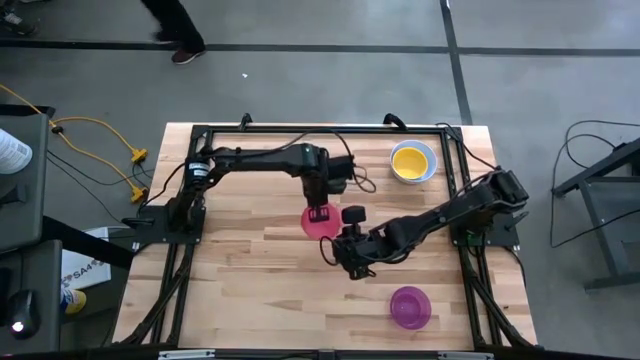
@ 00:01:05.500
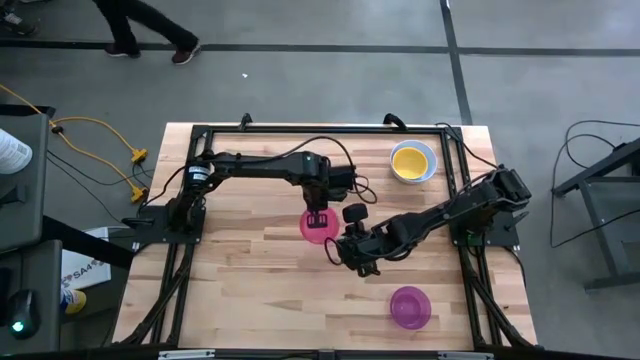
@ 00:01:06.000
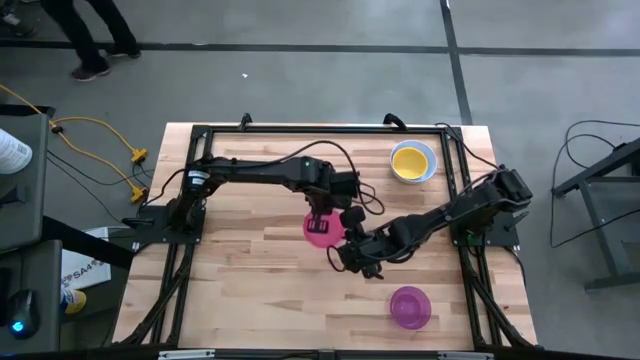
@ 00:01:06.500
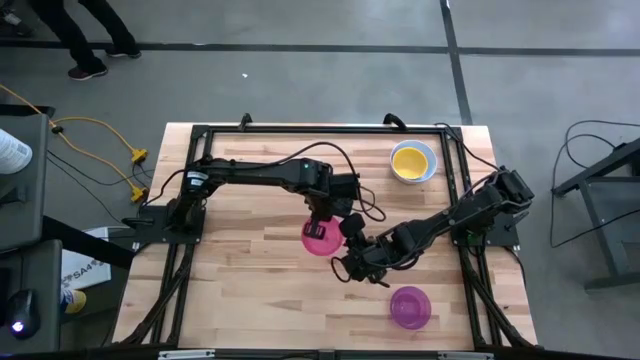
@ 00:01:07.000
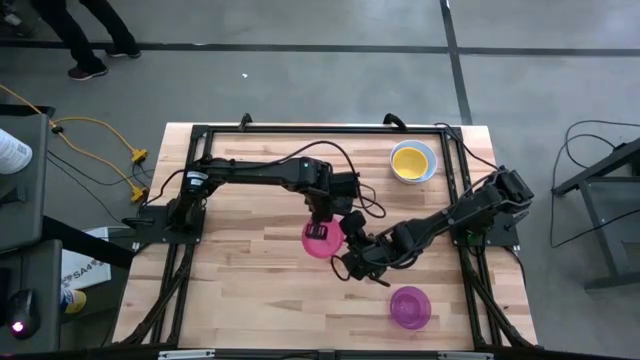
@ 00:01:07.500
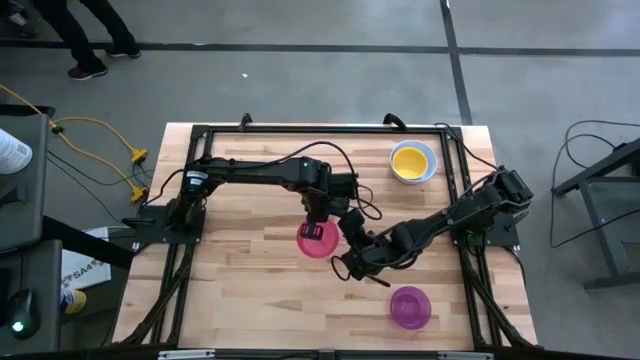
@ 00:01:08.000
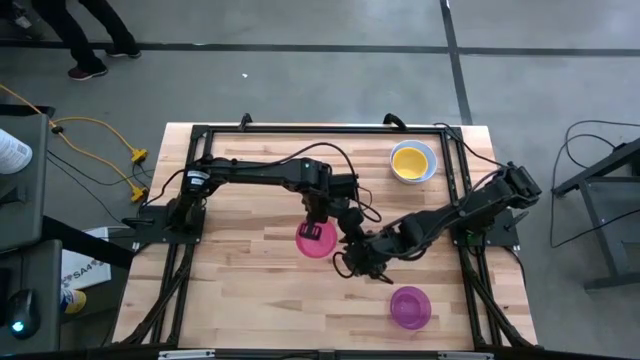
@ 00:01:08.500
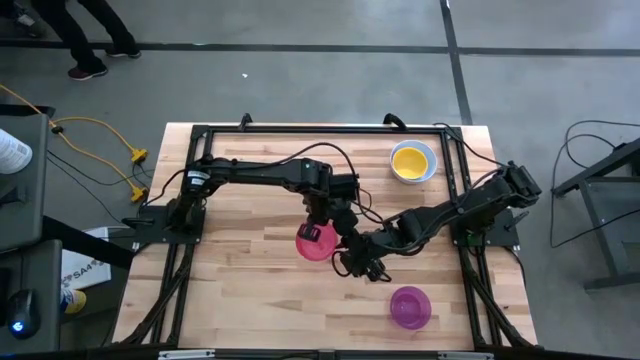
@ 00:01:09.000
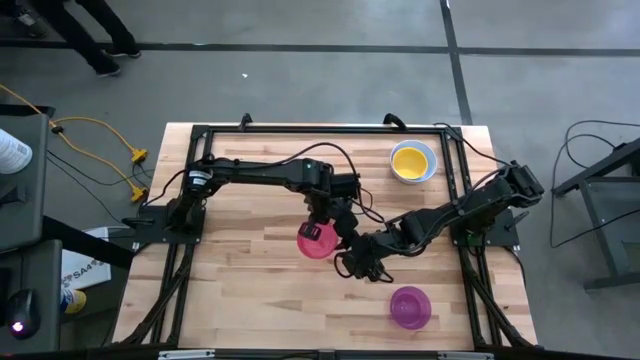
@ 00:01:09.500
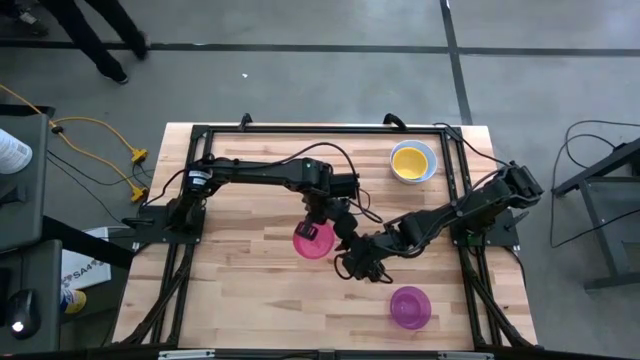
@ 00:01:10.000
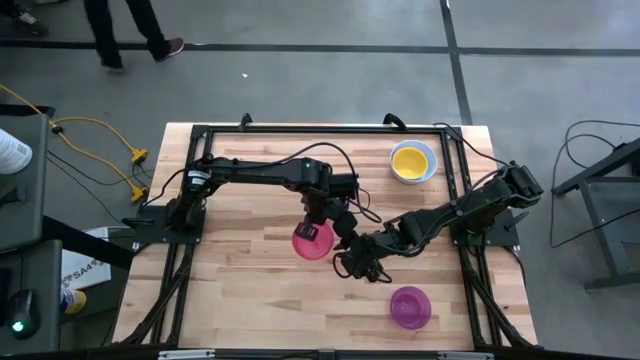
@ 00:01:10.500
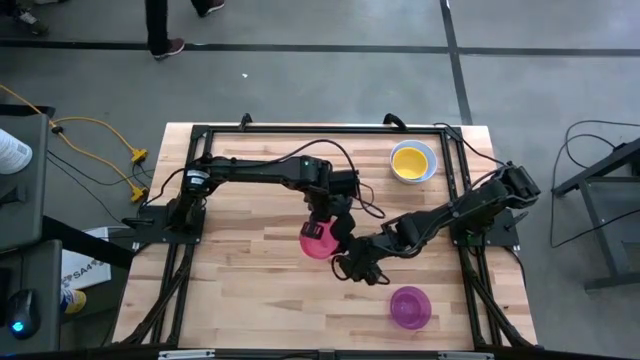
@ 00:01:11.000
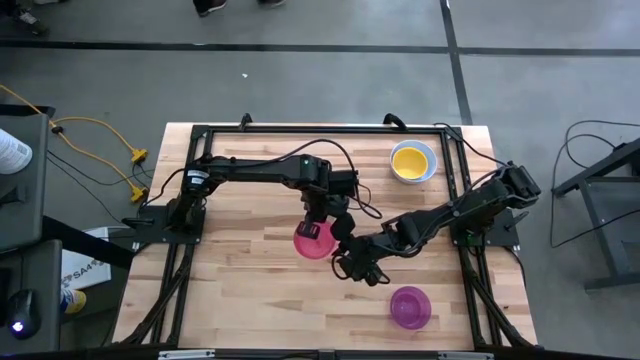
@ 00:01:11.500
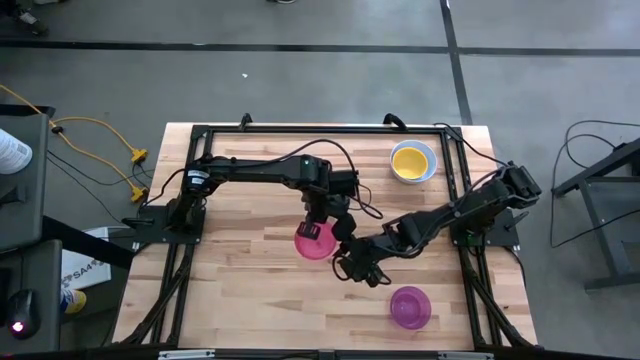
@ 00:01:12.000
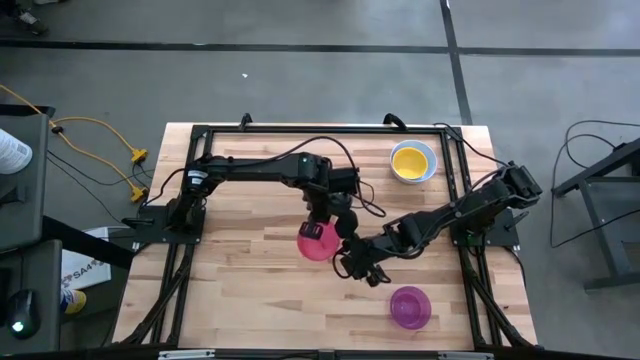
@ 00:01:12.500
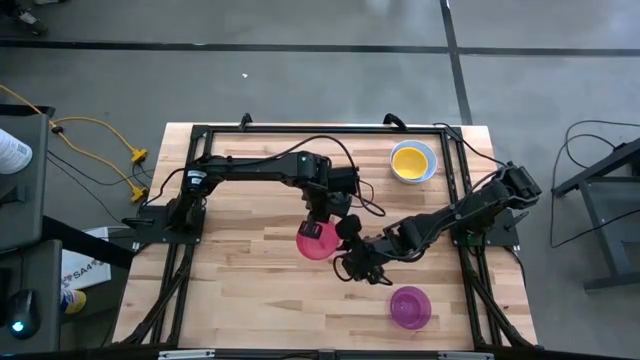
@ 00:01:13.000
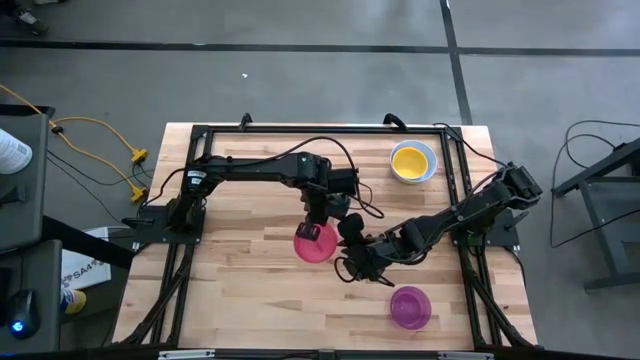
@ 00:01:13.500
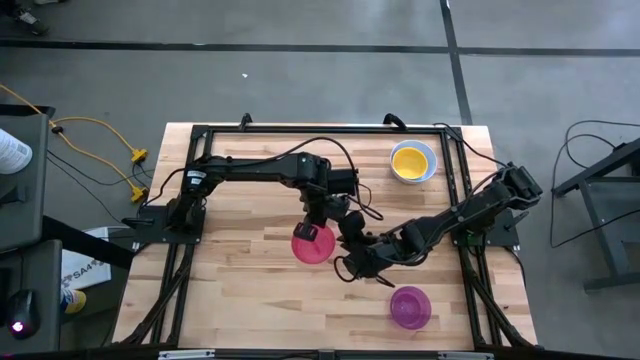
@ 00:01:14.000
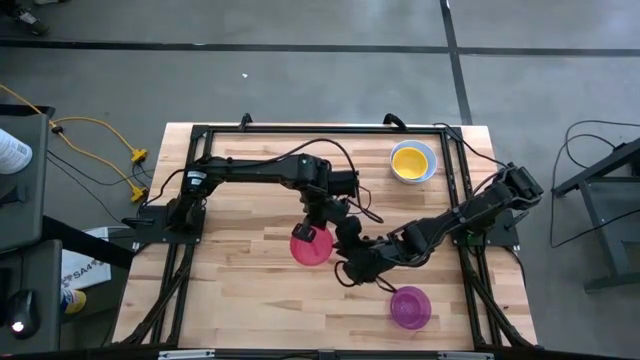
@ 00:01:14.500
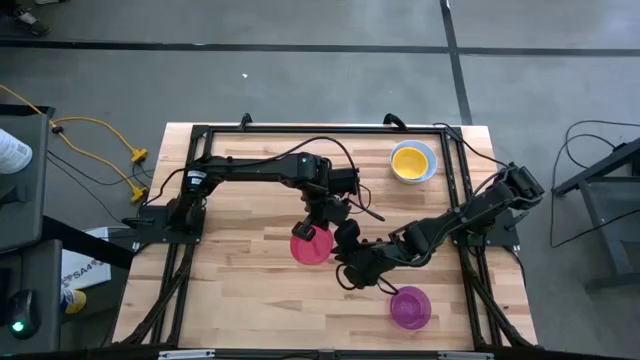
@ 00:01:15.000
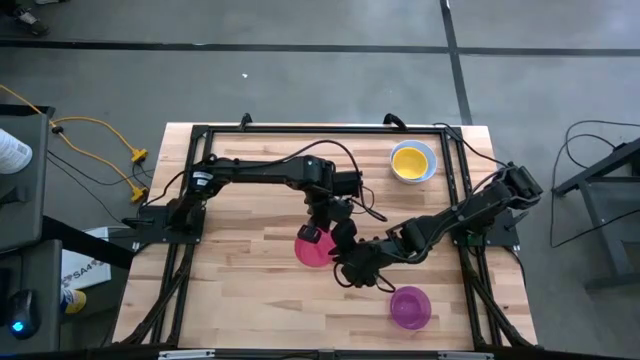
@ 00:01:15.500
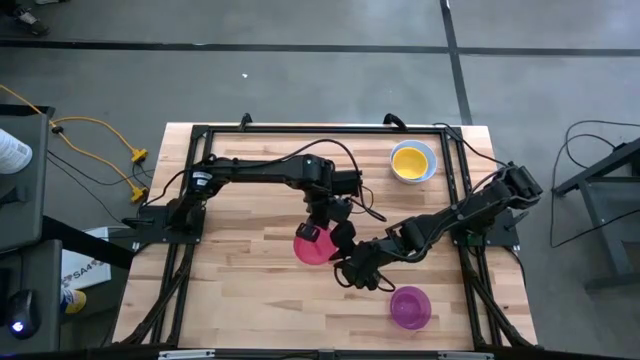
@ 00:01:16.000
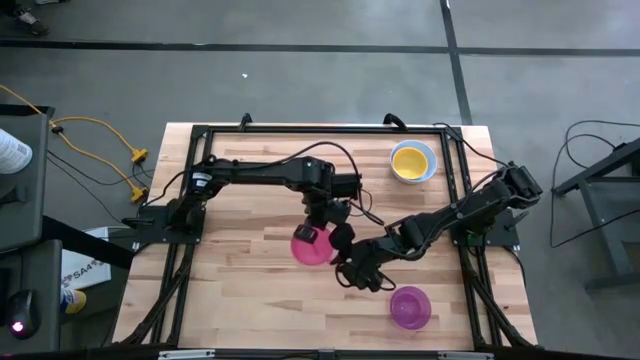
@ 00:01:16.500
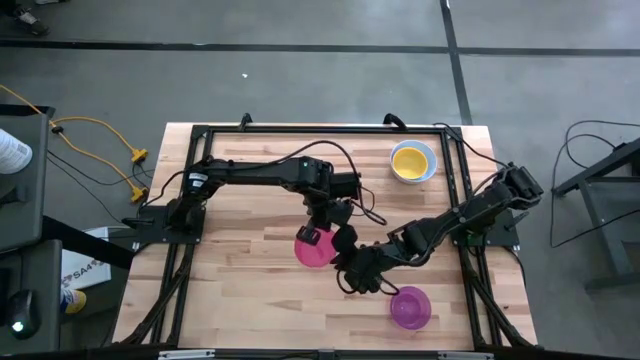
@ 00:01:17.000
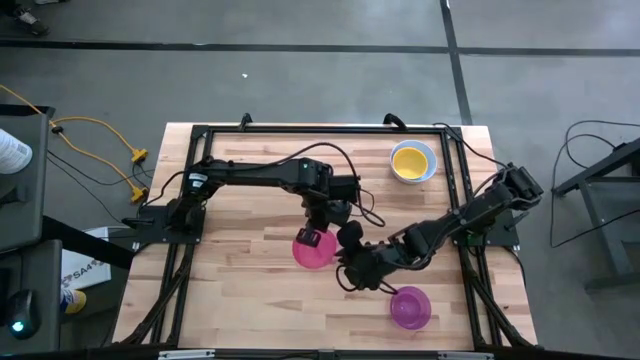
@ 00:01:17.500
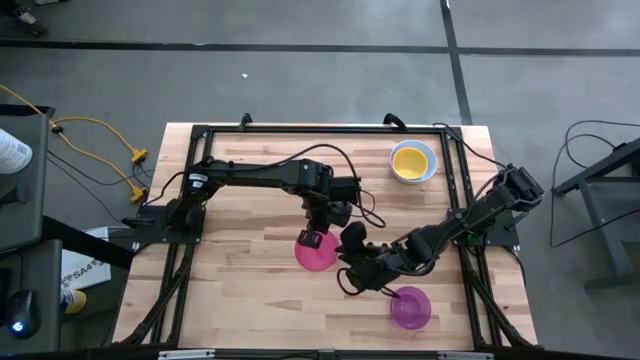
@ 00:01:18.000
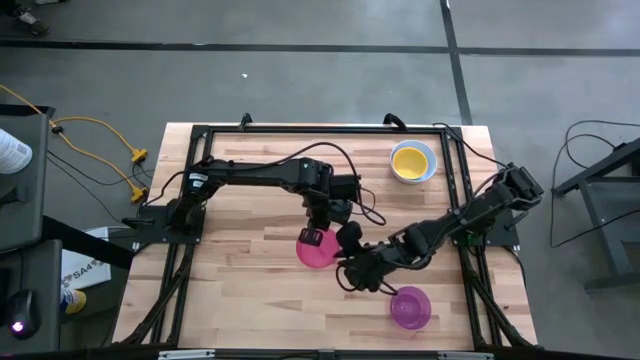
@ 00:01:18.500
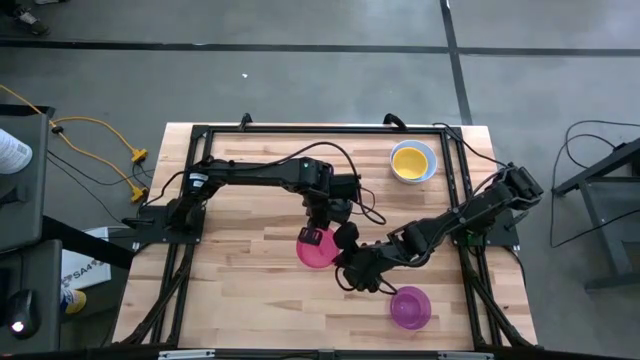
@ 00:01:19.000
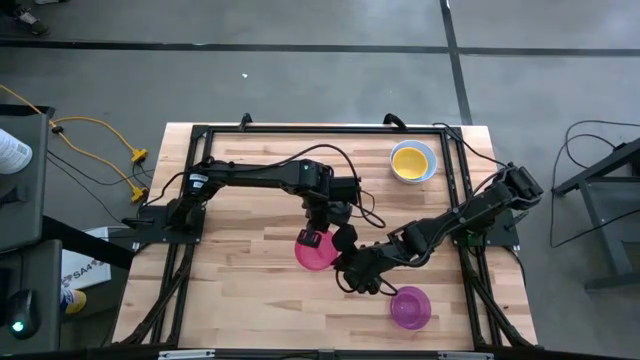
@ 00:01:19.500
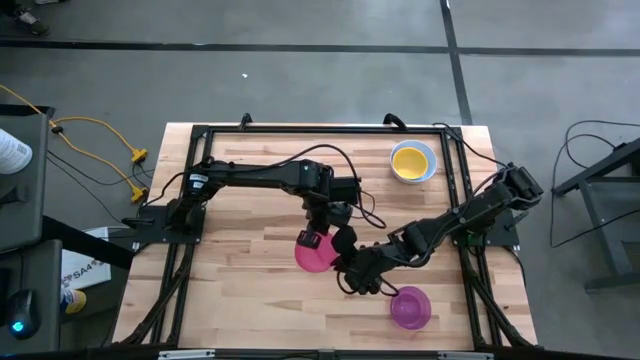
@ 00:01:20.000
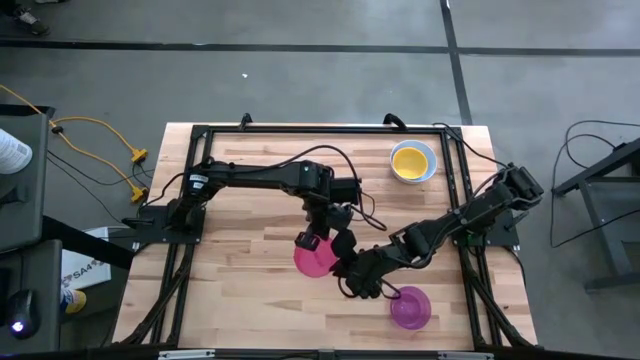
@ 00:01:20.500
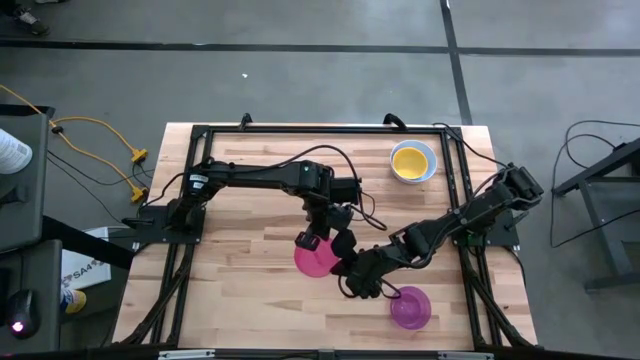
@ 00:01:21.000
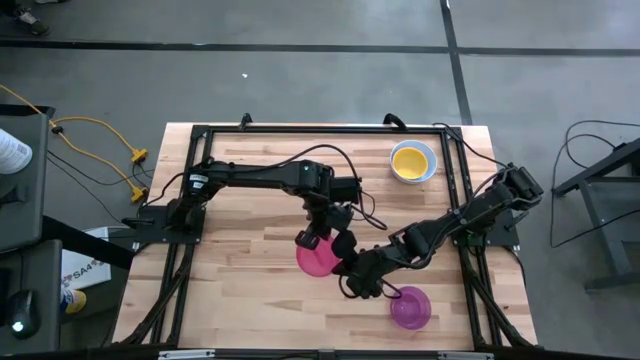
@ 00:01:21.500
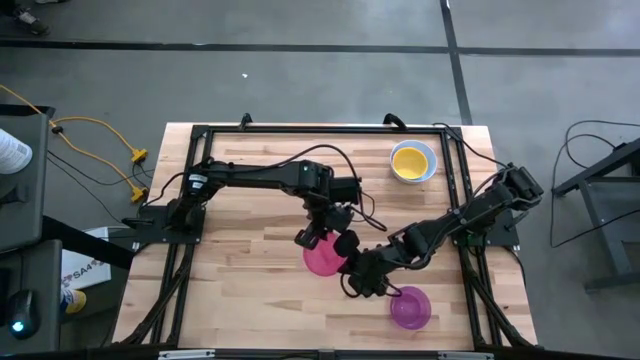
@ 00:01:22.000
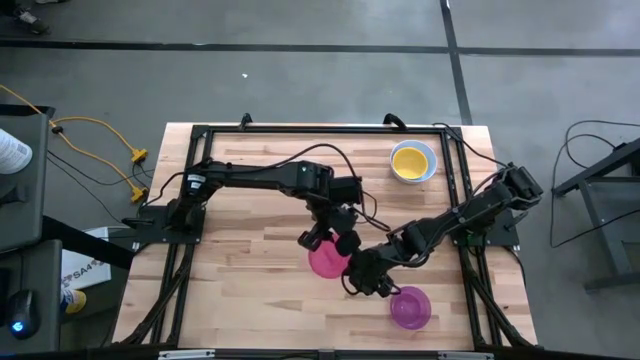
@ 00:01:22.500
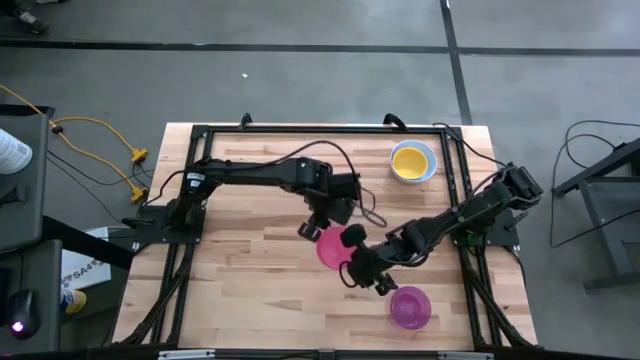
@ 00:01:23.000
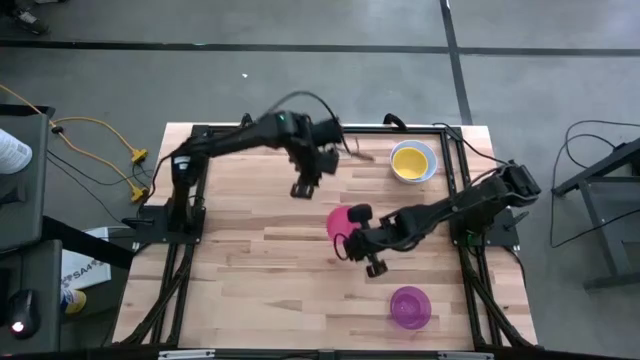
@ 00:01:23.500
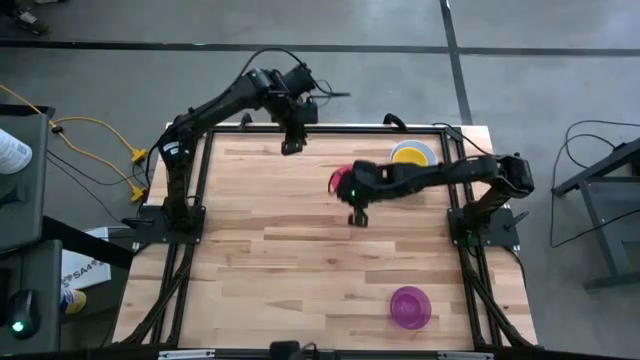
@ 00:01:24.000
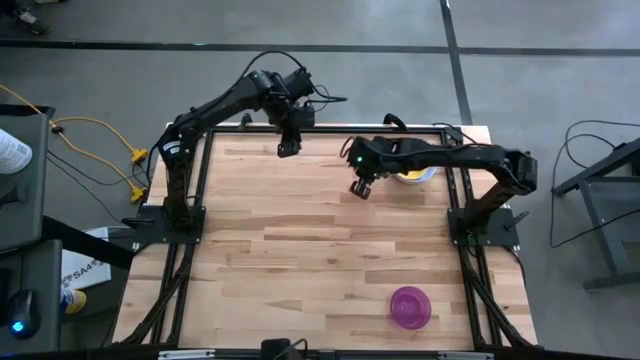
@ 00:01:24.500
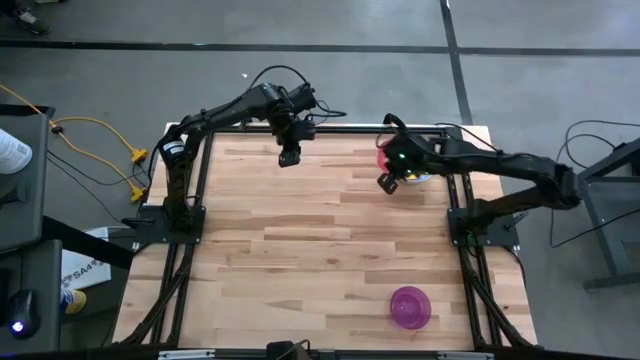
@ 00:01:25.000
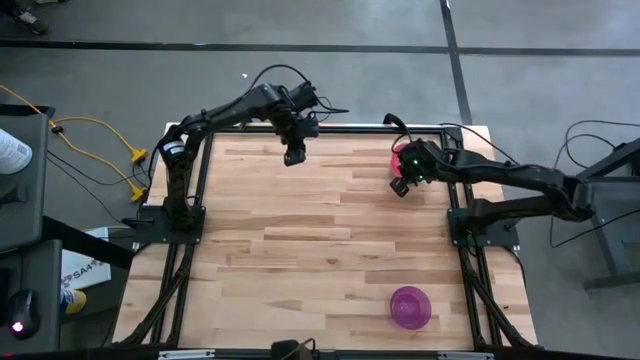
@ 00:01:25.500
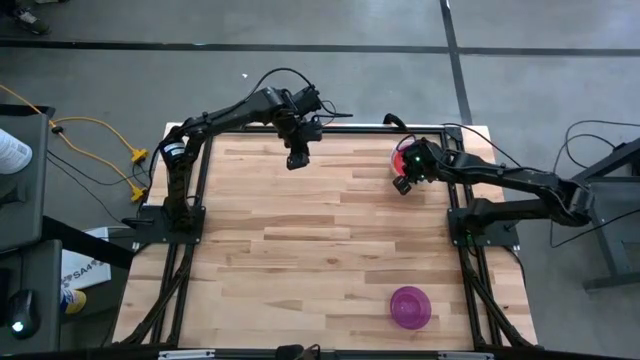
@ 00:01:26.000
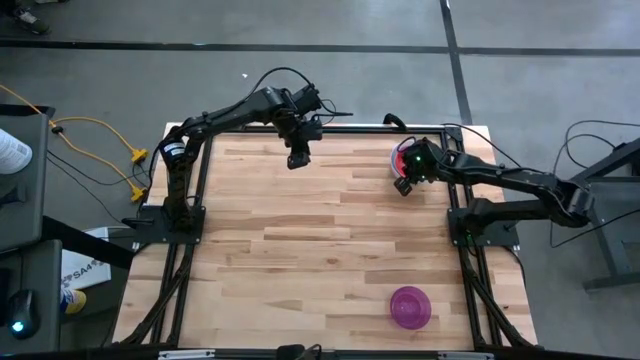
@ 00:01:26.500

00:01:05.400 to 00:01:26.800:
Stack the pink bowl on top of the yellow bowl
